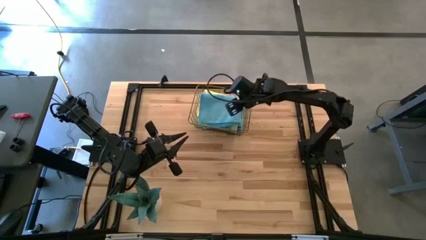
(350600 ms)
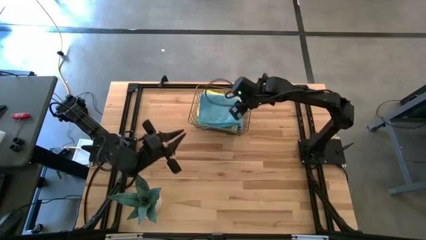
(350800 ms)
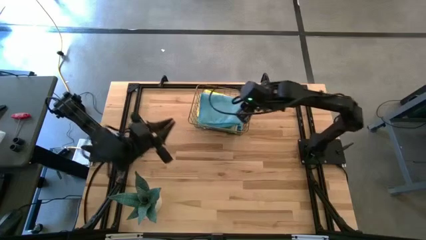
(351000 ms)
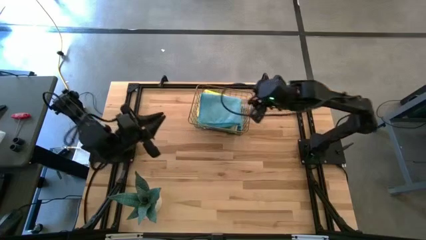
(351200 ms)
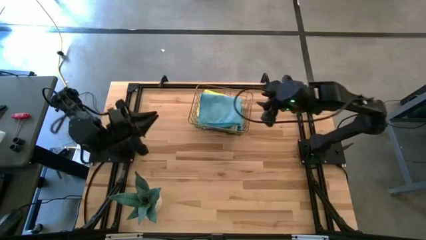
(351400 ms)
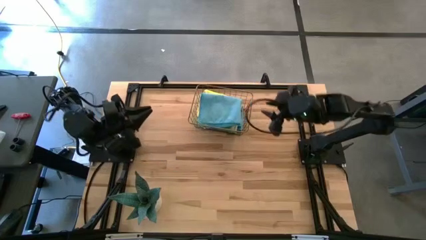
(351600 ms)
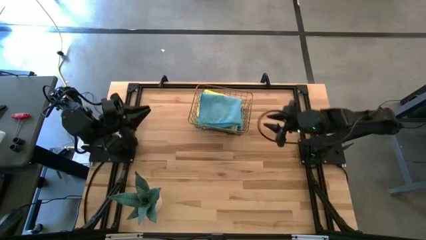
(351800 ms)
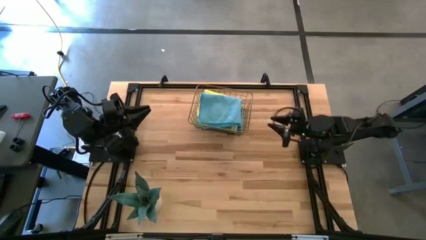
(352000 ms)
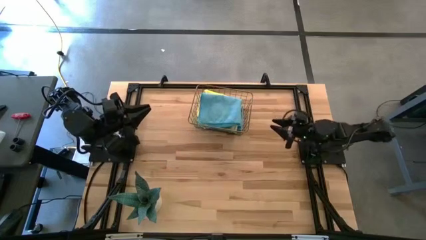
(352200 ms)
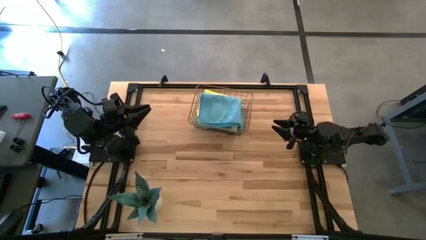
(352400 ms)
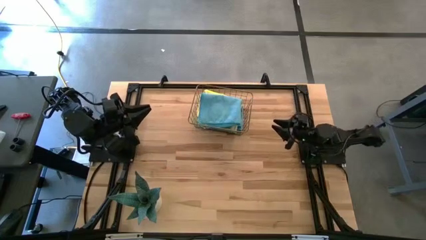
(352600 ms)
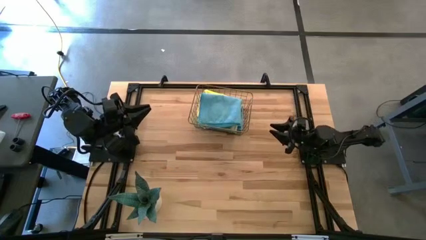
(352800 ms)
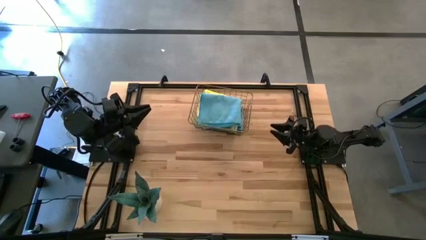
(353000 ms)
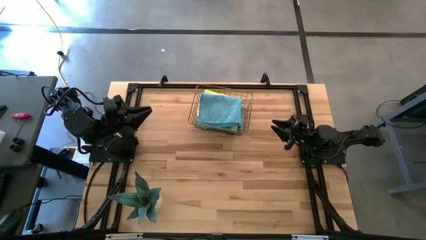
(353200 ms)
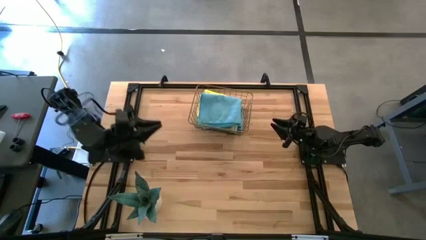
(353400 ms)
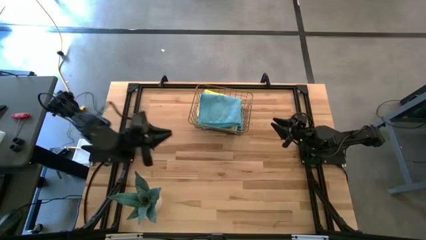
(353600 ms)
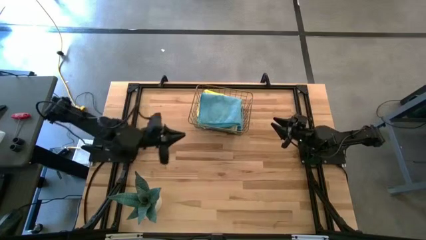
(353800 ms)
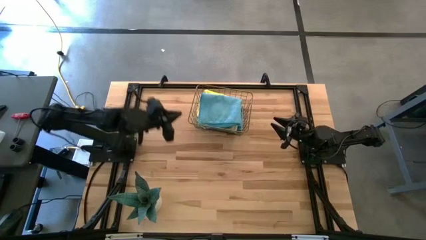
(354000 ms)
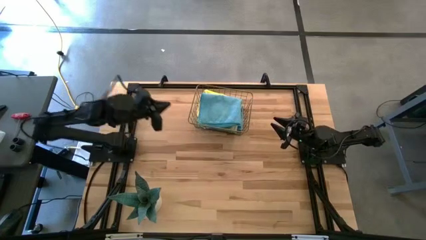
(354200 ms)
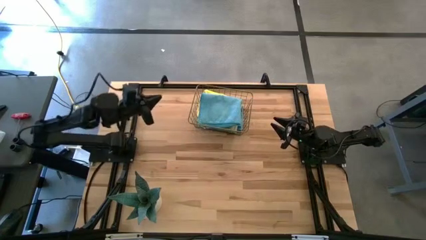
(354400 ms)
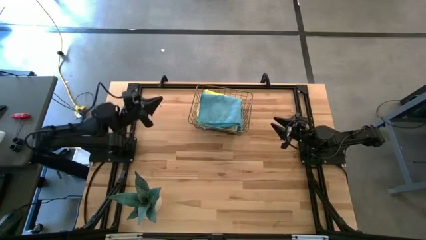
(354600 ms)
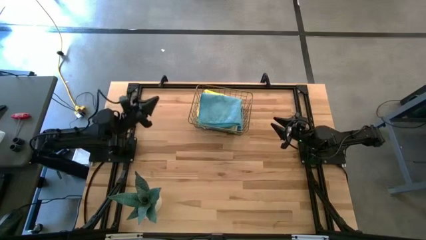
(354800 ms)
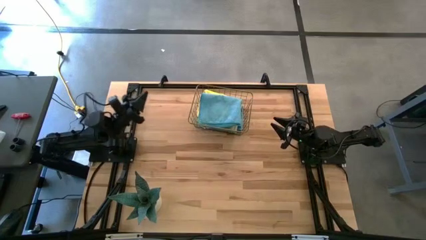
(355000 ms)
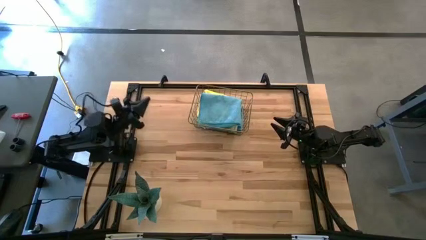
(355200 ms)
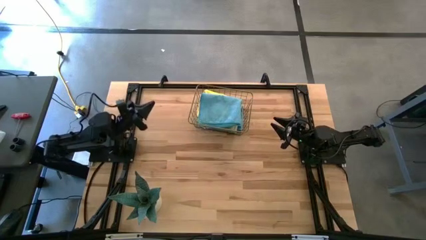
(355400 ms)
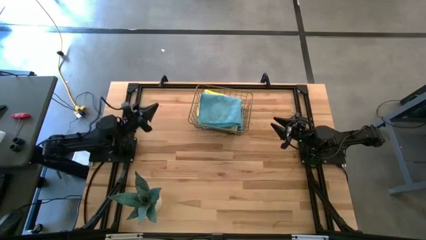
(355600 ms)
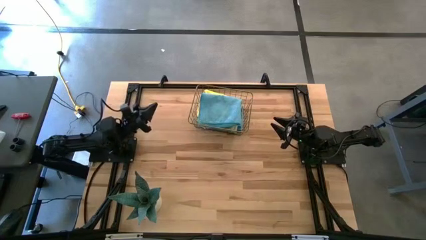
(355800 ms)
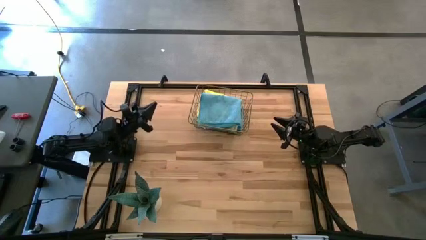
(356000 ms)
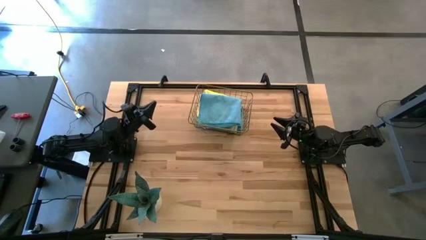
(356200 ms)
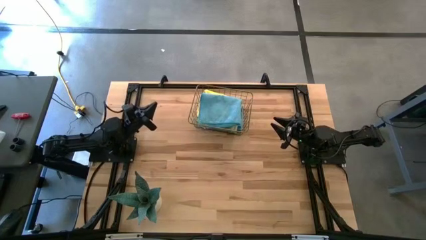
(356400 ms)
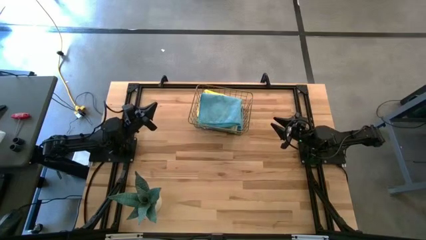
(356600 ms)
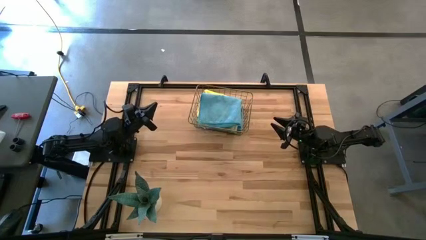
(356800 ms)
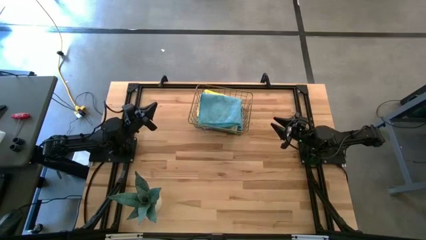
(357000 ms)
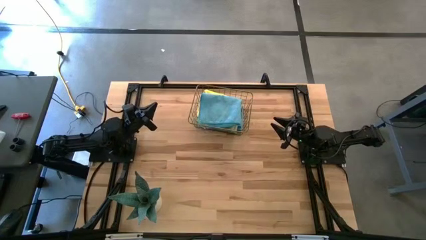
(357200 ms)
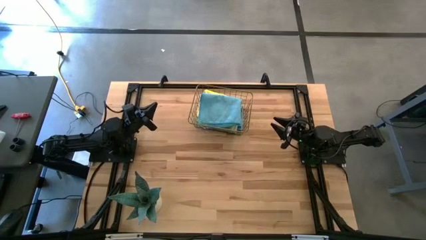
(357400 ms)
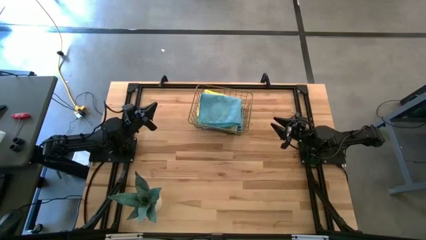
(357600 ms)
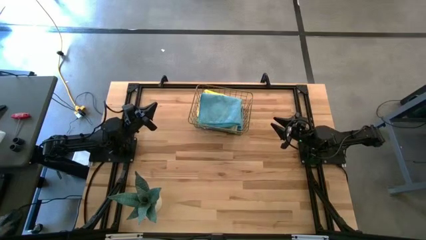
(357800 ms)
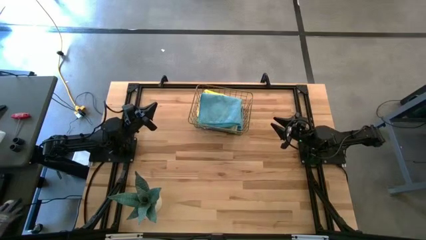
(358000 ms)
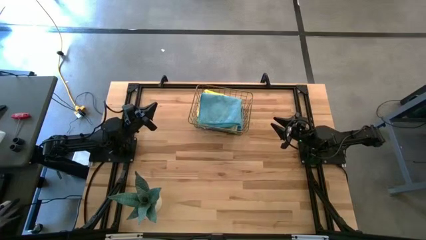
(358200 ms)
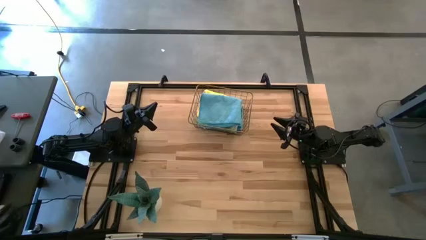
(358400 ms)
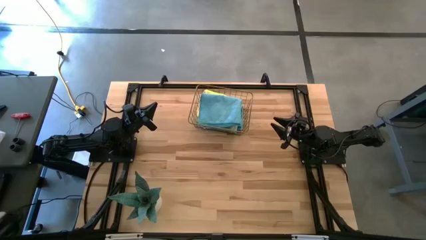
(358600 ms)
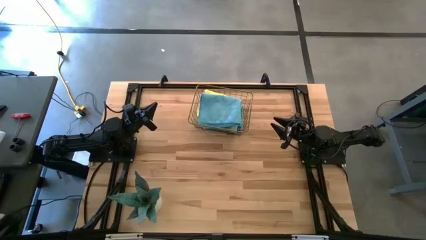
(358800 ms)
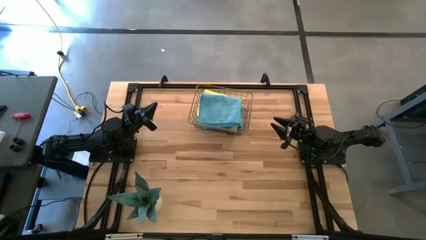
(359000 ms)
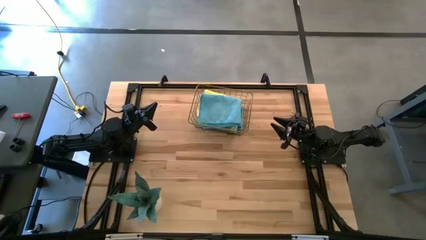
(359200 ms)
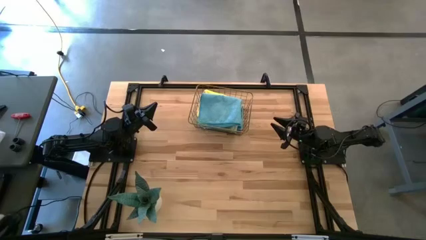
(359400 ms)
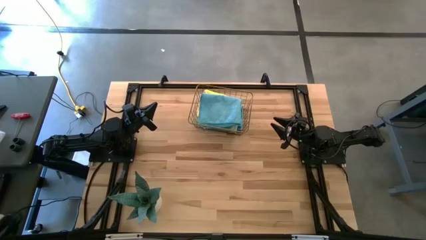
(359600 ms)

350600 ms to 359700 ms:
Task: Fold microfiber towels
Return to Home Position
